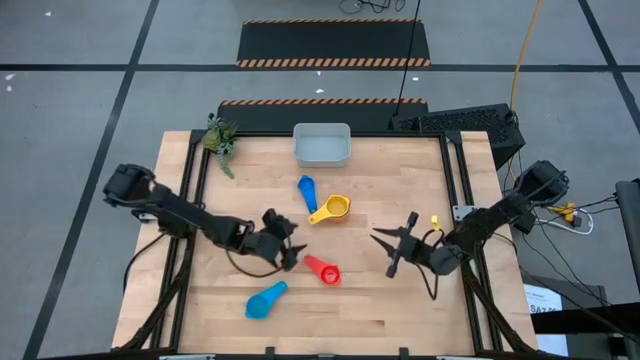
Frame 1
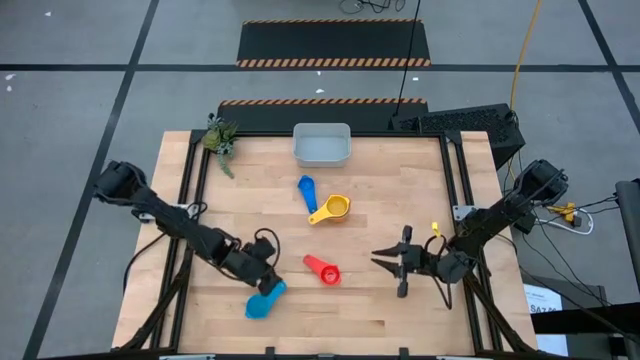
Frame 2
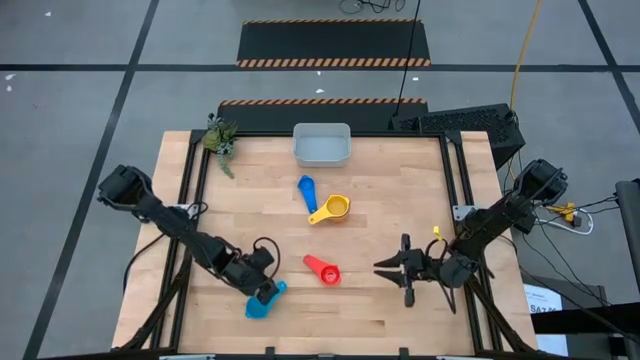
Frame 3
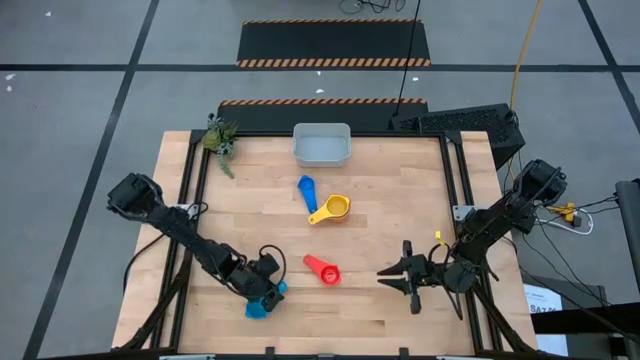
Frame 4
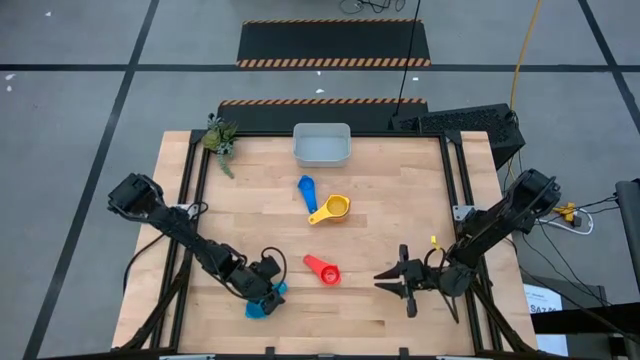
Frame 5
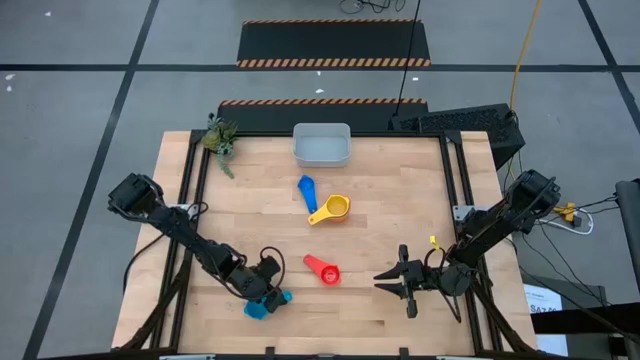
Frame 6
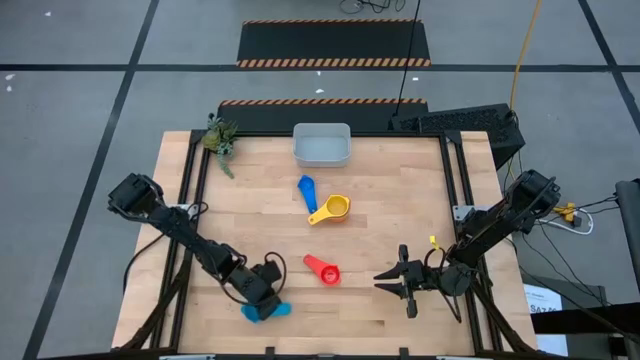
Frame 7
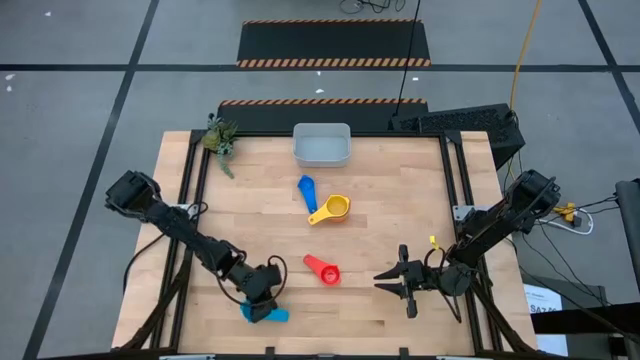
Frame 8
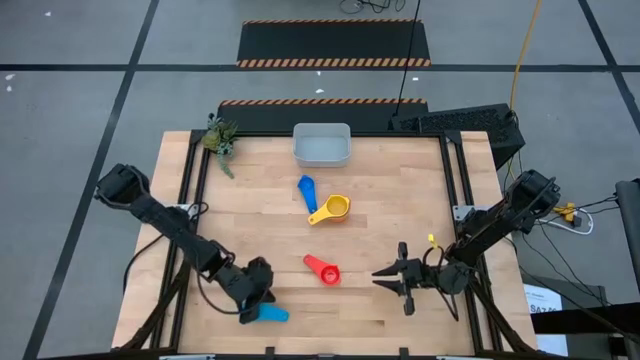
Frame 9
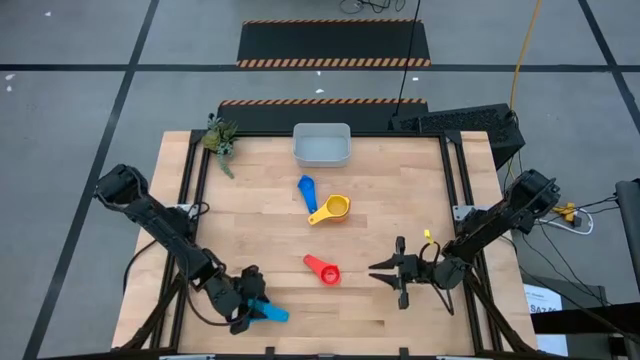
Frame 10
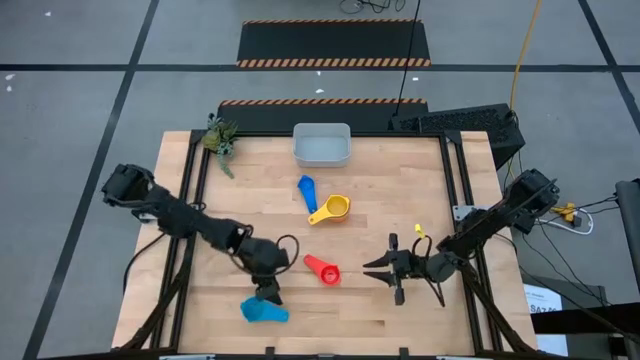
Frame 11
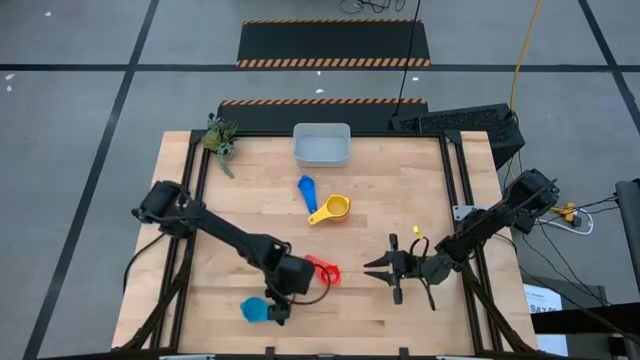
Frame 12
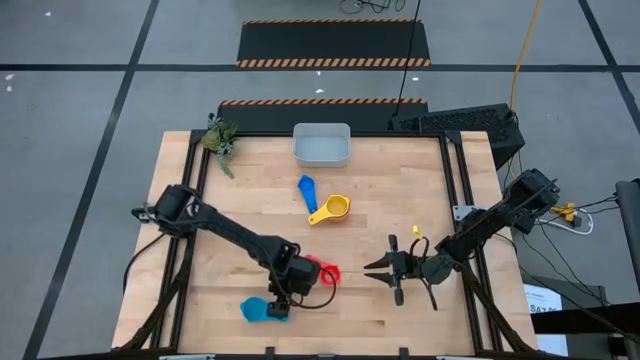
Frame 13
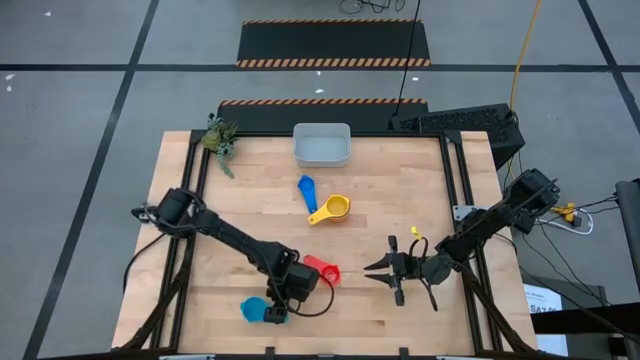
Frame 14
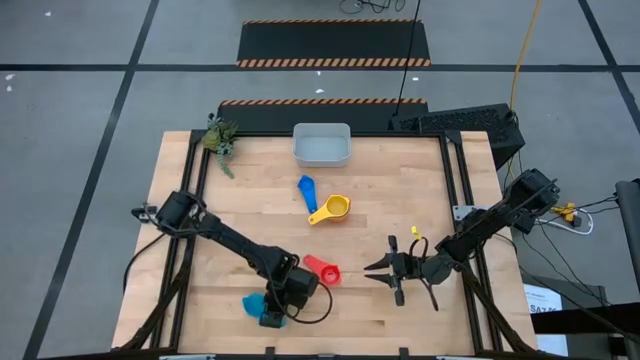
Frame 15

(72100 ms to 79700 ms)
Task: Nest measuring cups in basket
Stack the light blue measuring cup into the yellow measuring cup

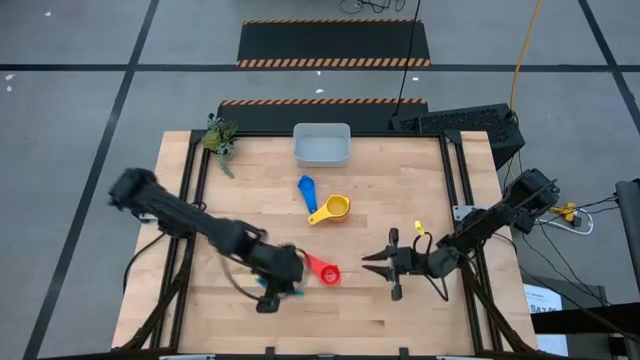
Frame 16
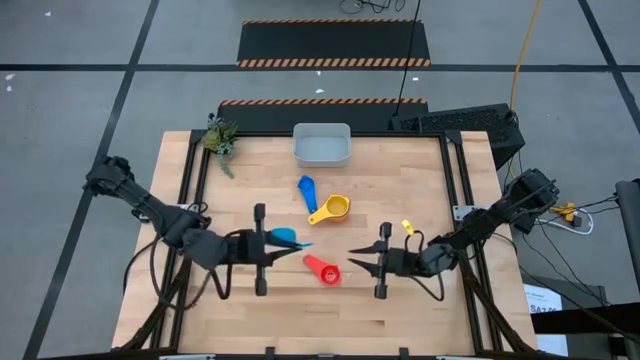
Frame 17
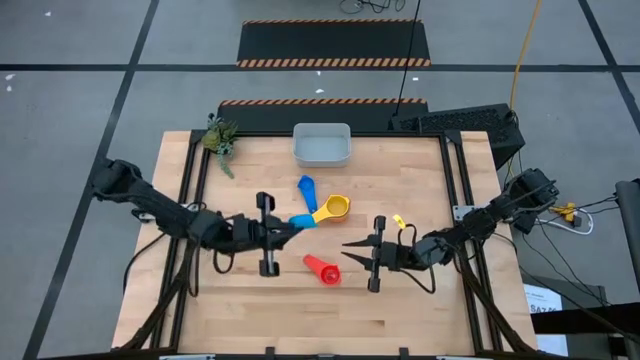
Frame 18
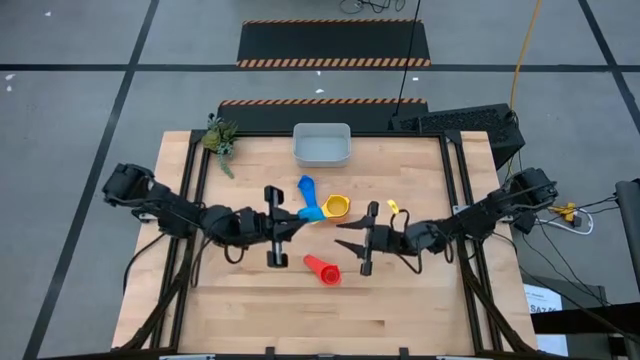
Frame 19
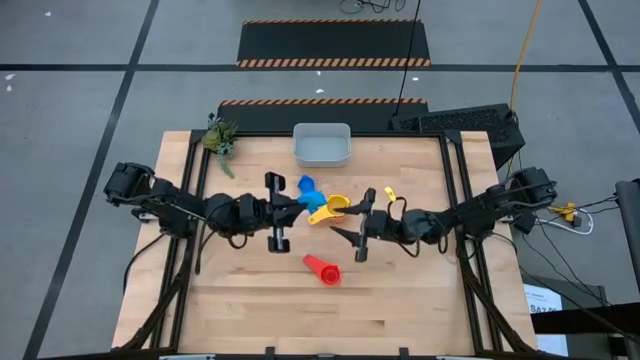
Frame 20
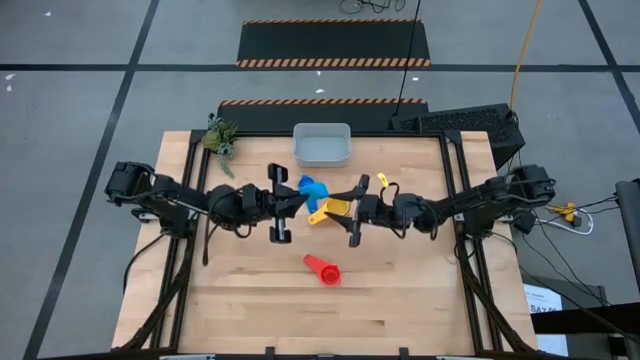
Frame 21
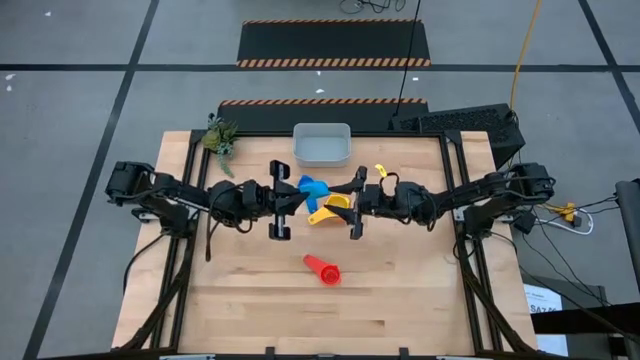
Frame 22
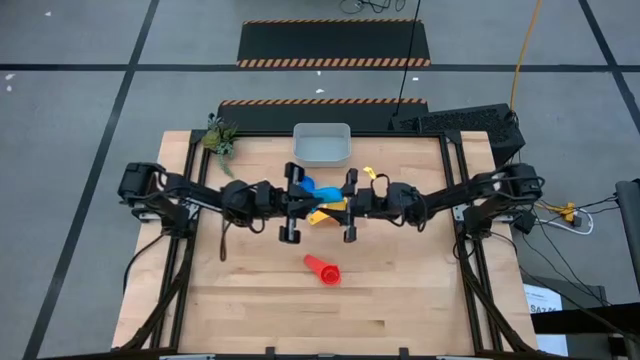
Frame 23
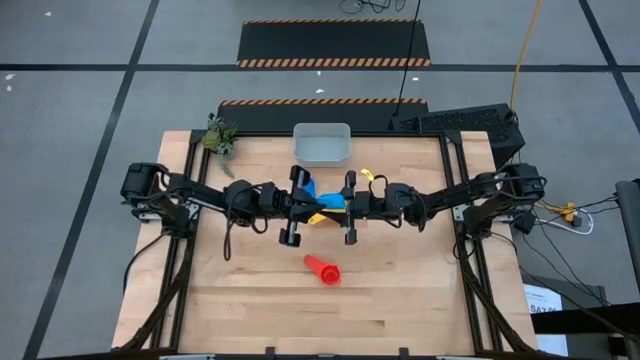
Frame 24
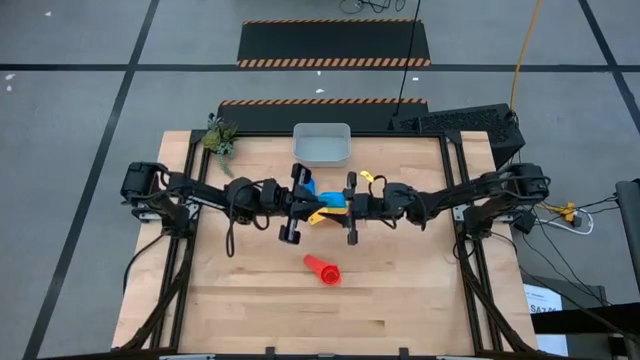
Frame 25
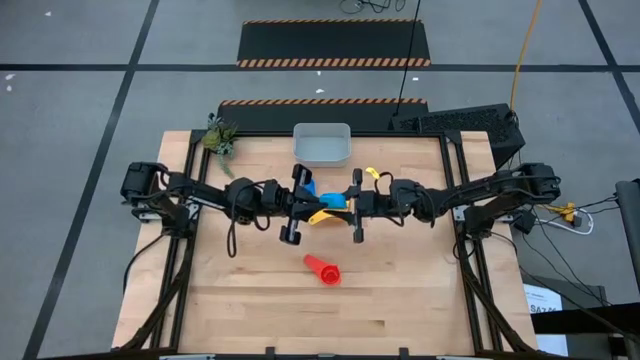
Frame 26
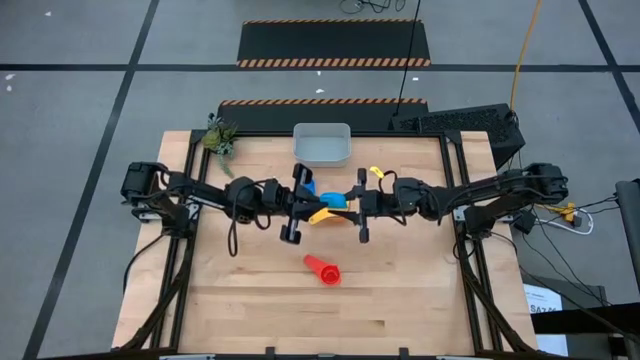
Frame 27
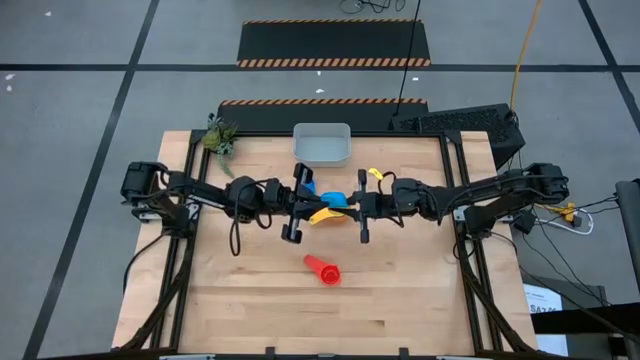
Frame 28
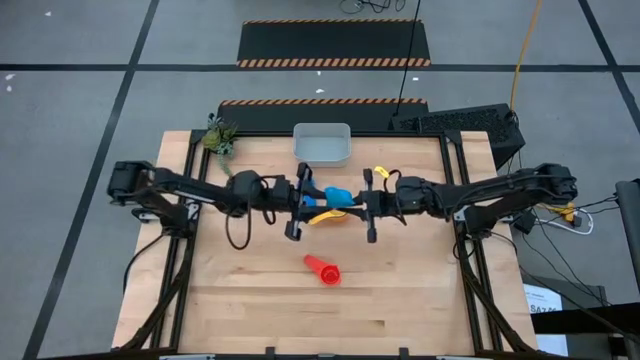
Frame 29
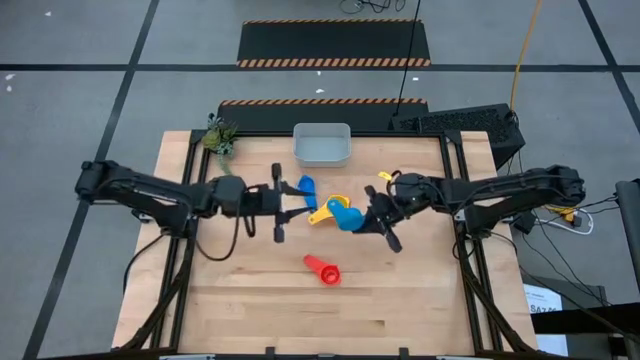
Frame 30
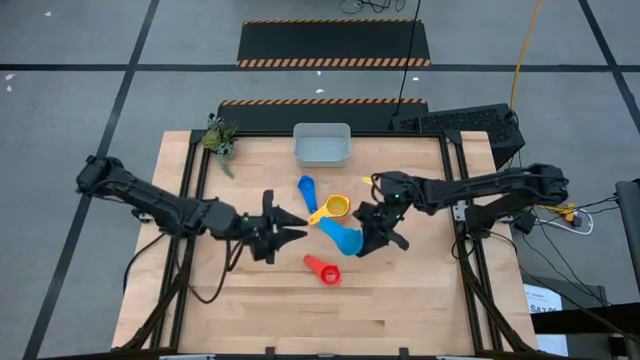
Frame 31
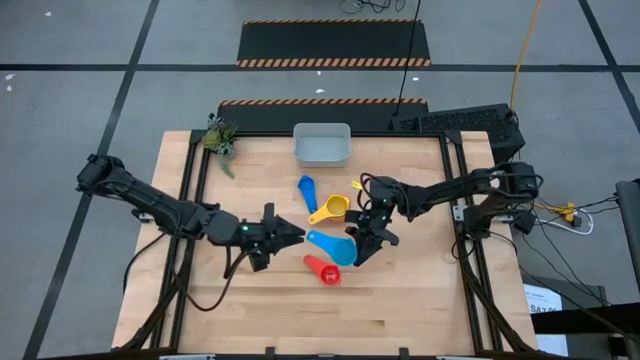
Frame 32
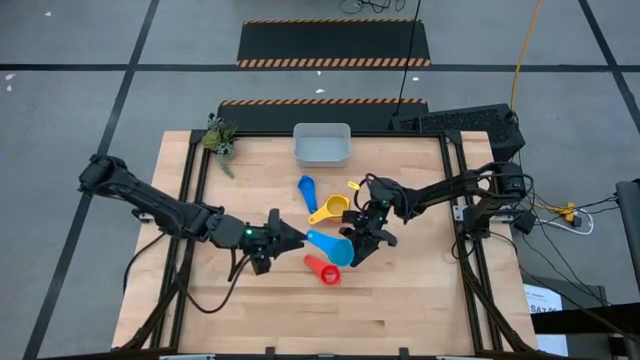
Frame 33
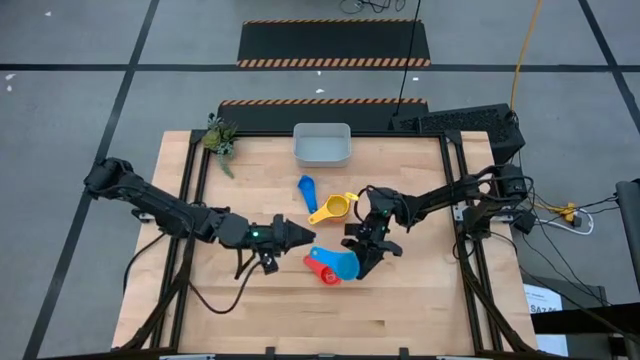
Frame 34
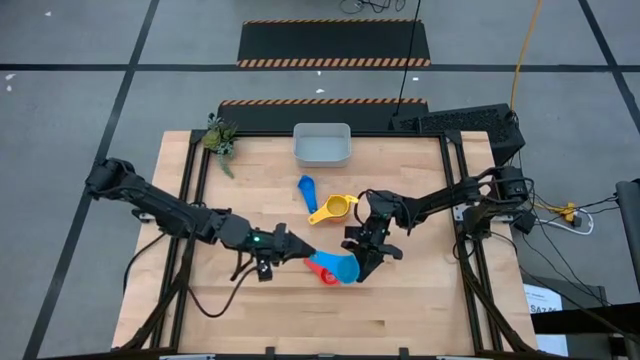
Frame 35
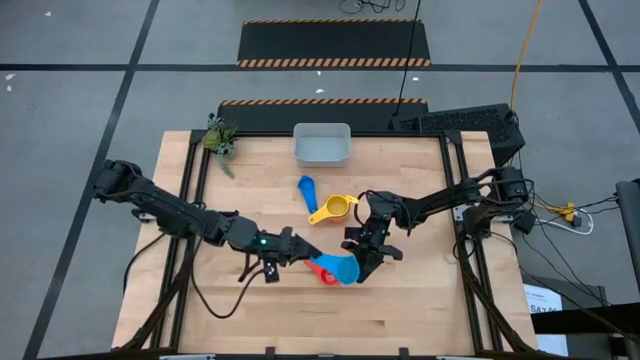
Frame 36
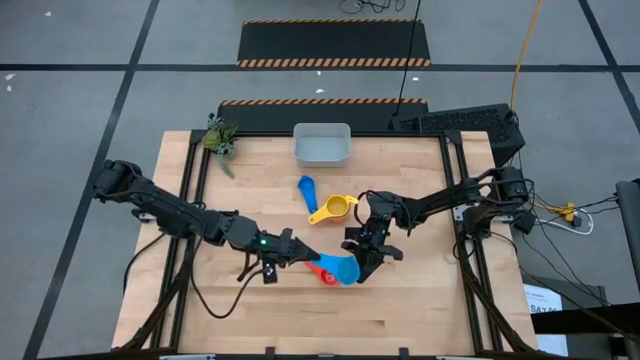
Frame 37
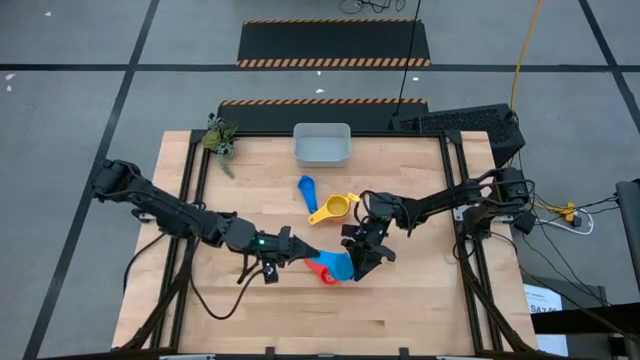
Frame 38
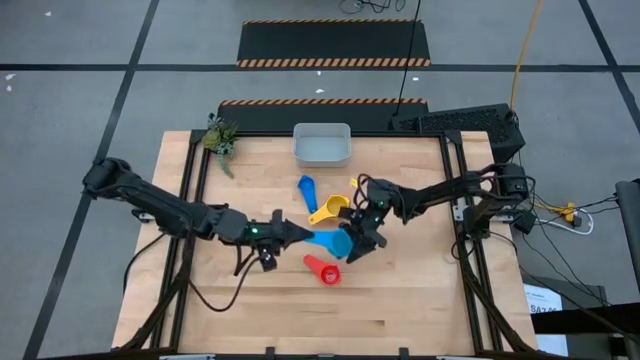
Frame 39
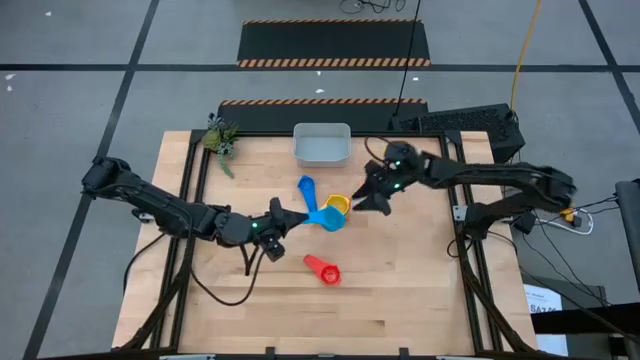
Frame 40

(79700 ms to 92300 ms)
Stack the light blue measuring cup into the yellow measuring cup

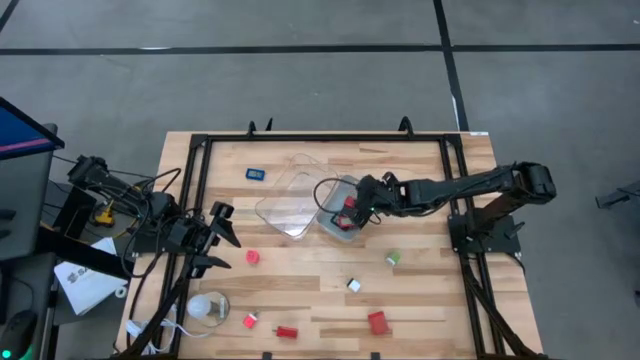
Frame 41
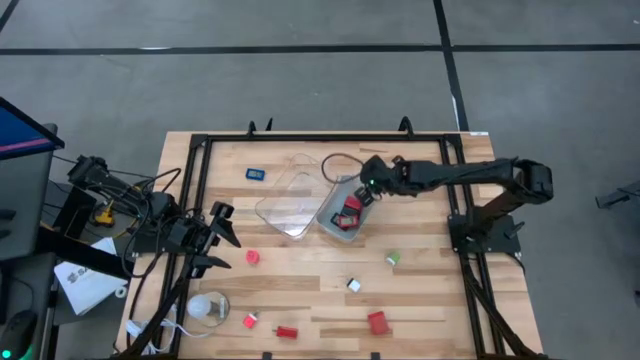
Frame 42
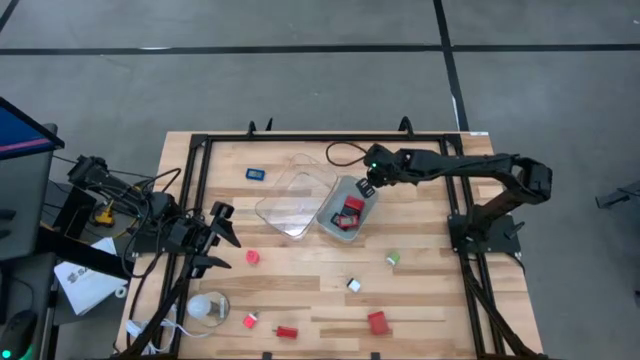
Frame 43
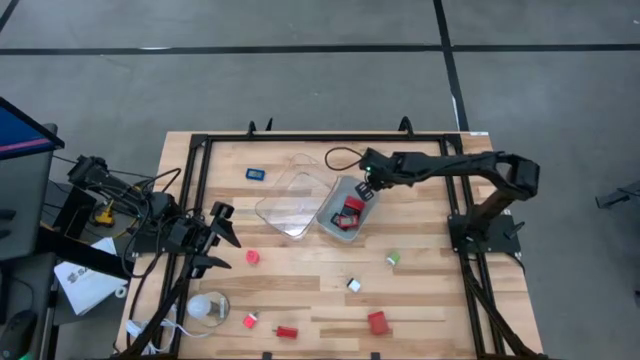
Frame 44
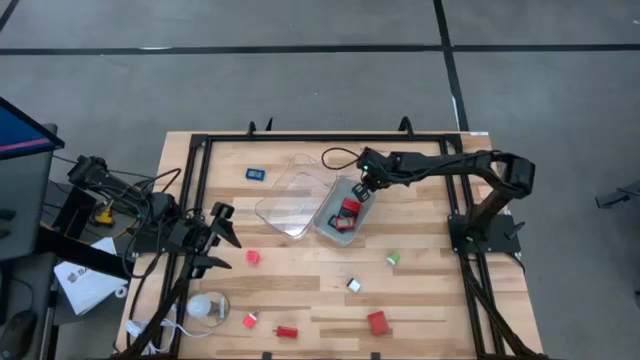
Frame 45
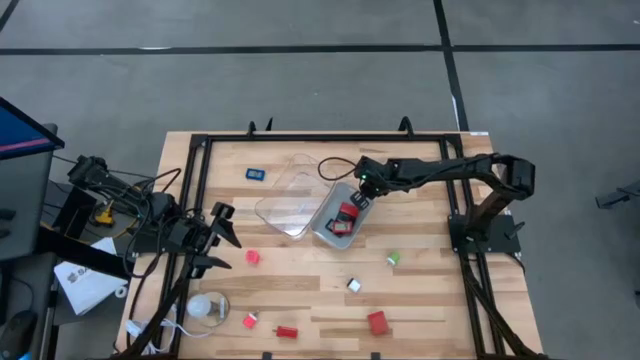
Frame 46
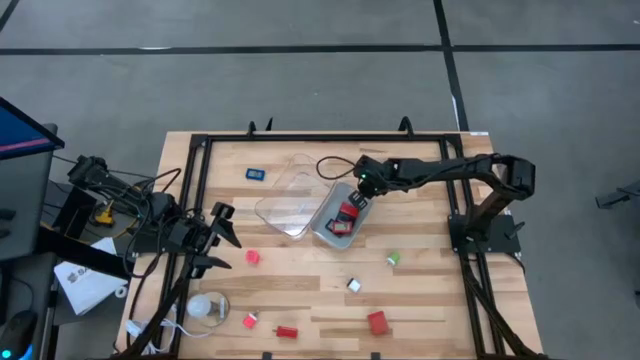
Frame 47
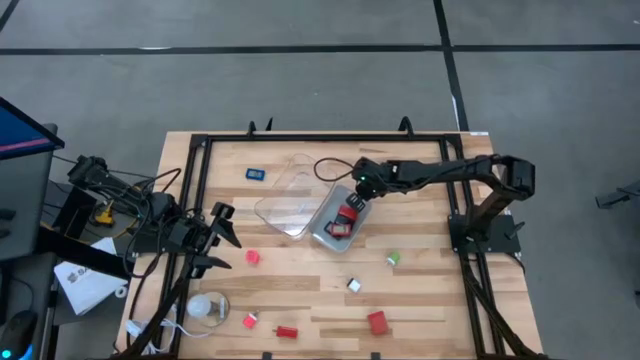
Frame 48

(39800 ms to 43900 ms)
Task: Pick & Place Office items
Adjust the gray bin
